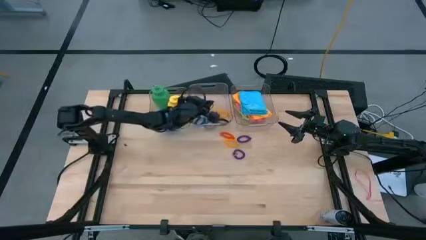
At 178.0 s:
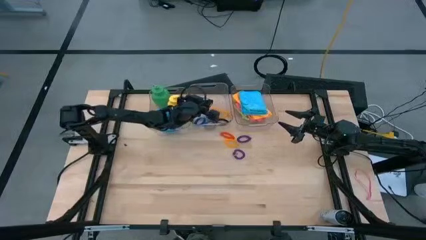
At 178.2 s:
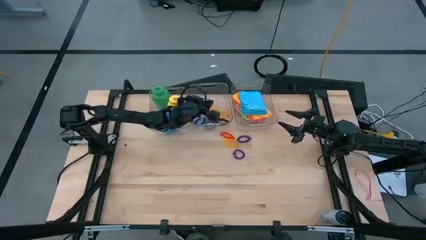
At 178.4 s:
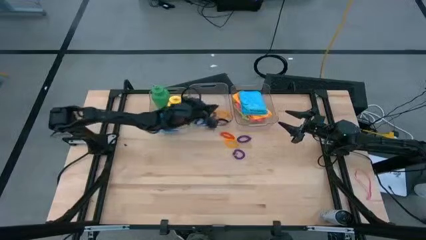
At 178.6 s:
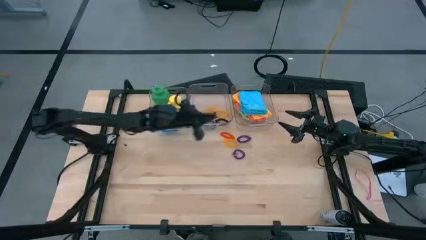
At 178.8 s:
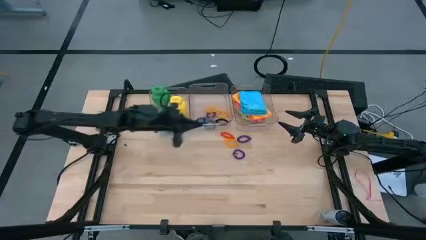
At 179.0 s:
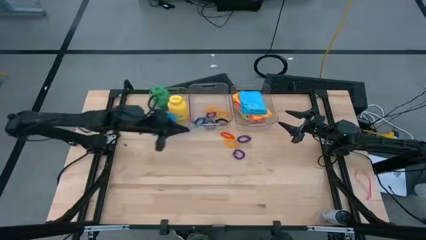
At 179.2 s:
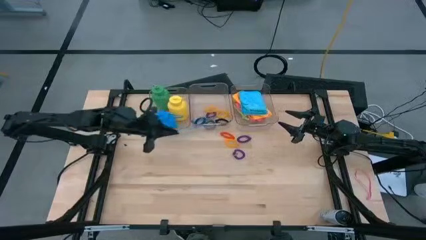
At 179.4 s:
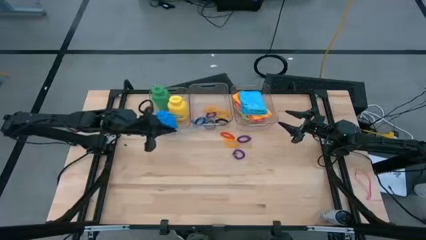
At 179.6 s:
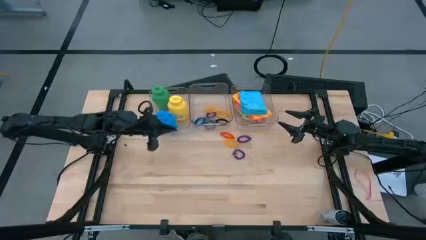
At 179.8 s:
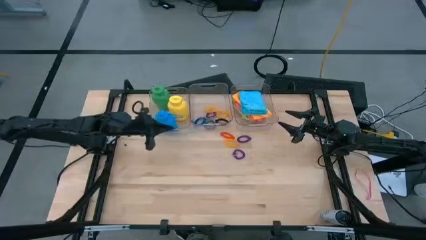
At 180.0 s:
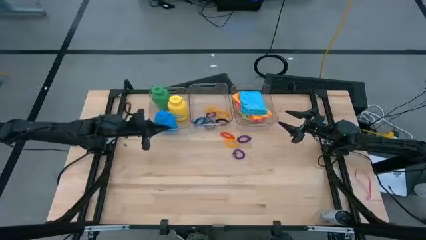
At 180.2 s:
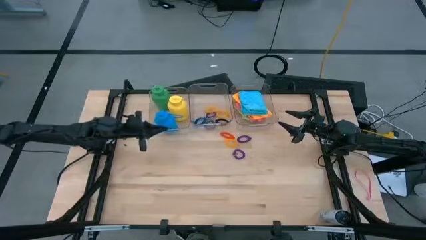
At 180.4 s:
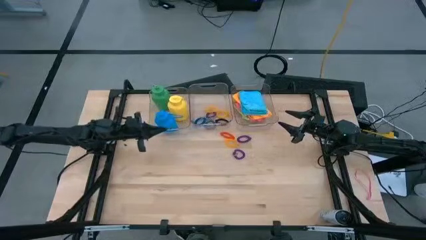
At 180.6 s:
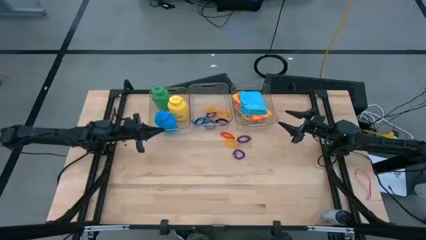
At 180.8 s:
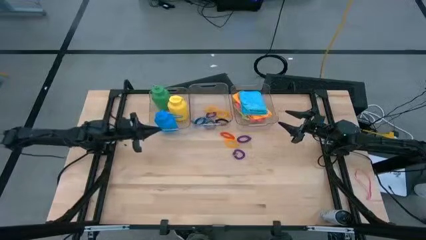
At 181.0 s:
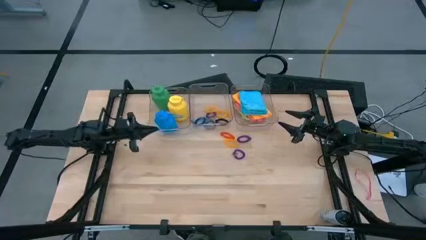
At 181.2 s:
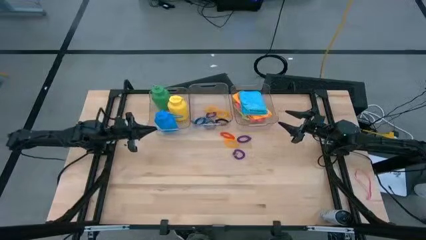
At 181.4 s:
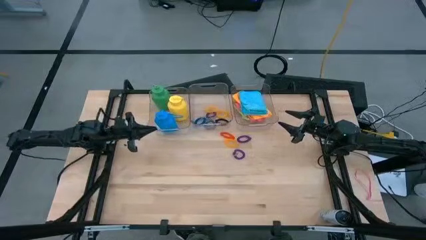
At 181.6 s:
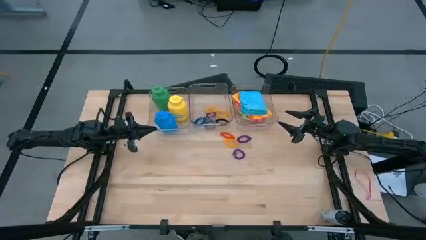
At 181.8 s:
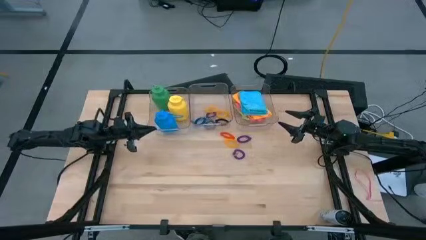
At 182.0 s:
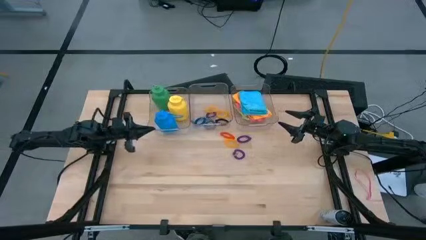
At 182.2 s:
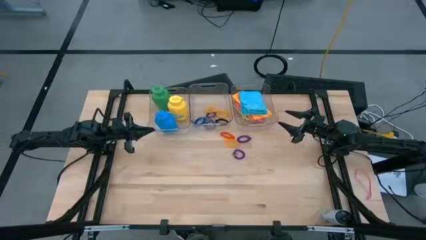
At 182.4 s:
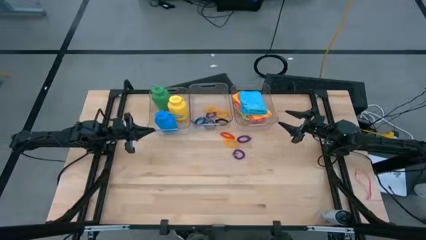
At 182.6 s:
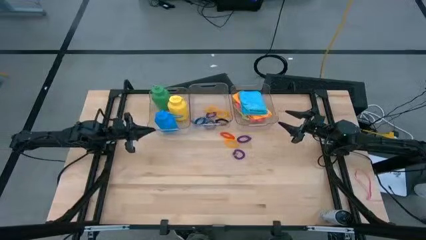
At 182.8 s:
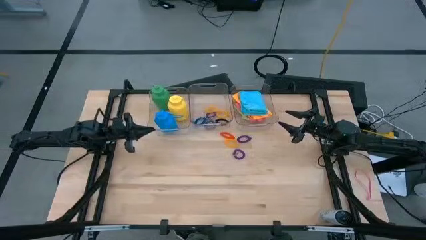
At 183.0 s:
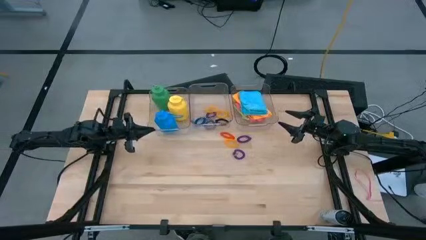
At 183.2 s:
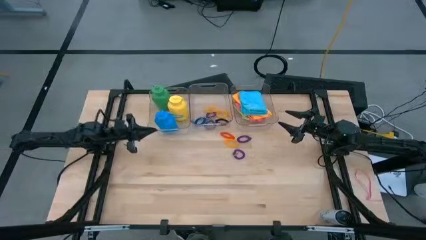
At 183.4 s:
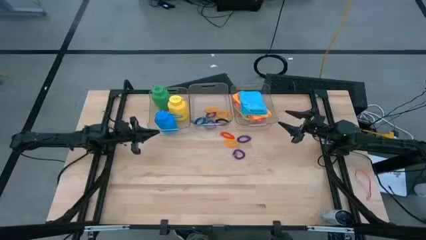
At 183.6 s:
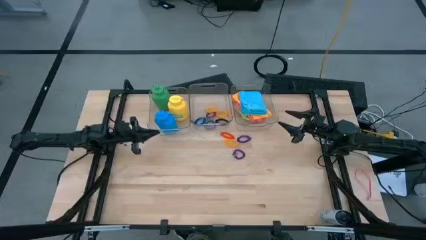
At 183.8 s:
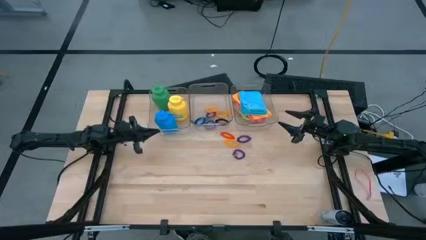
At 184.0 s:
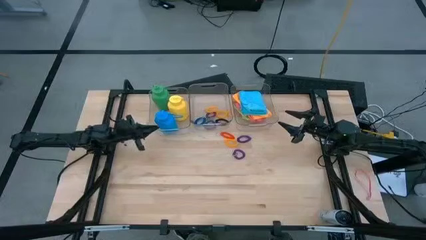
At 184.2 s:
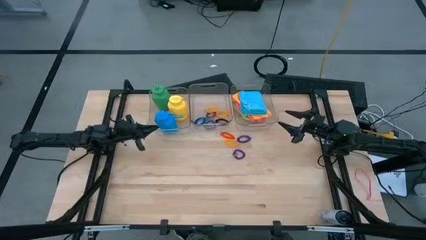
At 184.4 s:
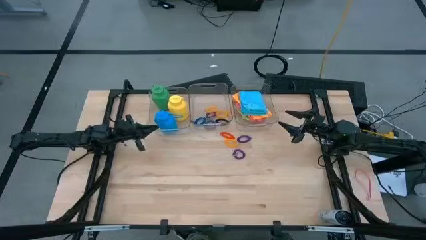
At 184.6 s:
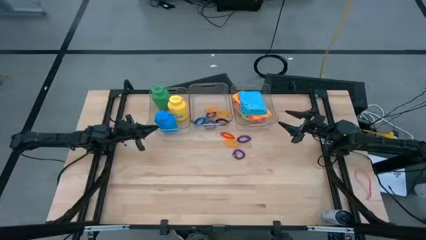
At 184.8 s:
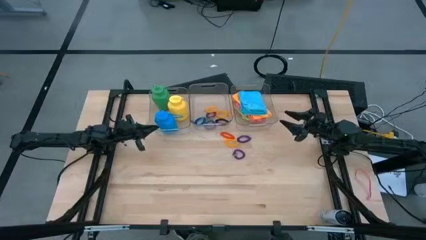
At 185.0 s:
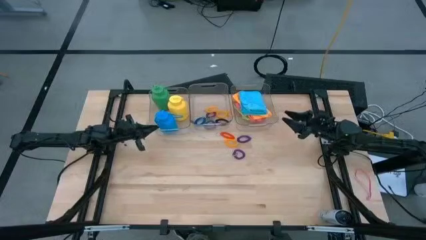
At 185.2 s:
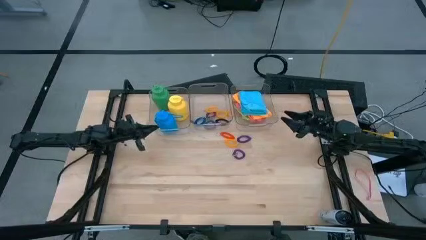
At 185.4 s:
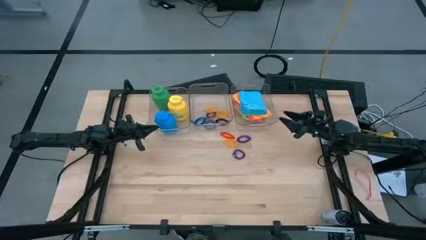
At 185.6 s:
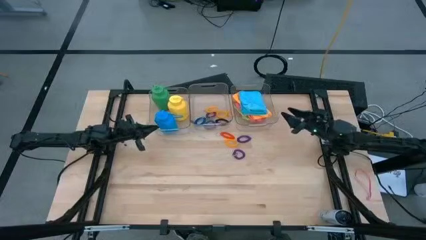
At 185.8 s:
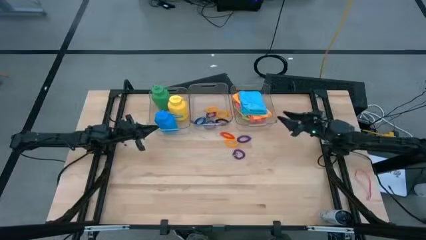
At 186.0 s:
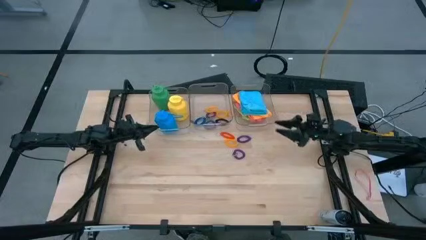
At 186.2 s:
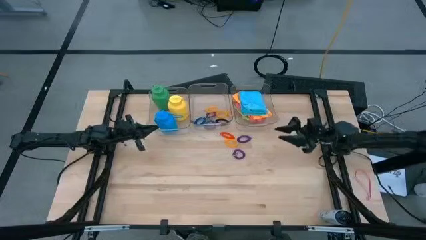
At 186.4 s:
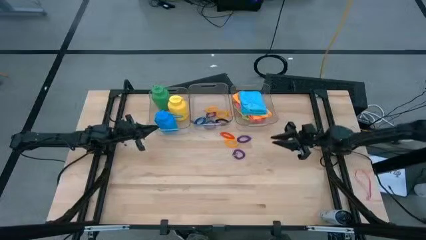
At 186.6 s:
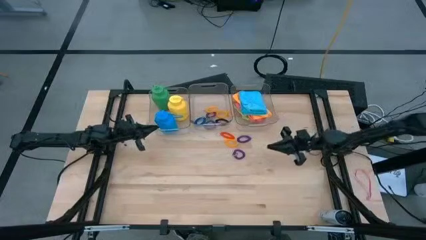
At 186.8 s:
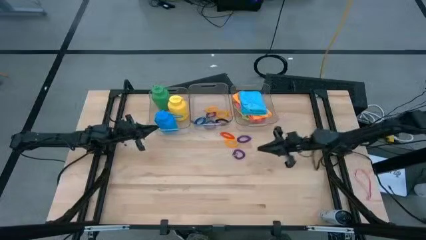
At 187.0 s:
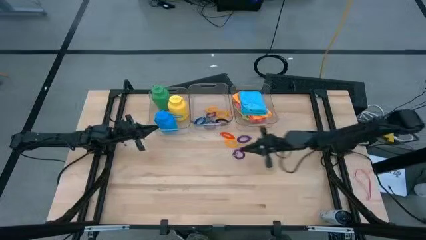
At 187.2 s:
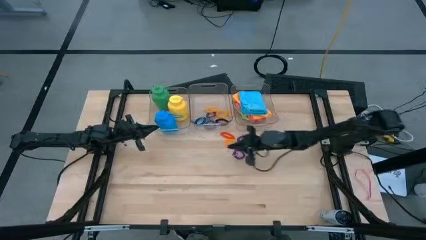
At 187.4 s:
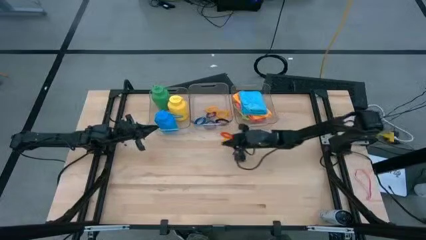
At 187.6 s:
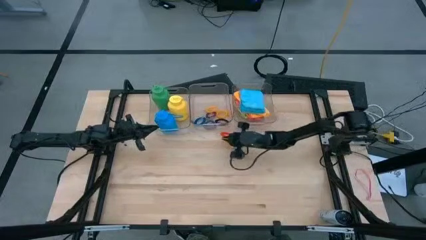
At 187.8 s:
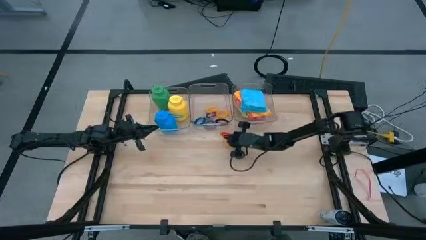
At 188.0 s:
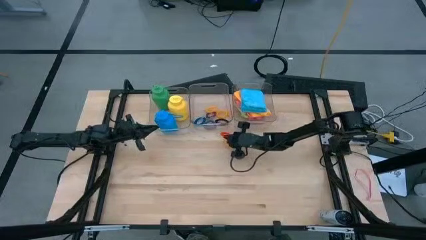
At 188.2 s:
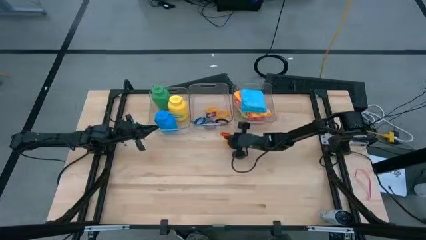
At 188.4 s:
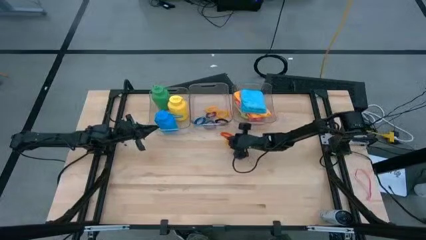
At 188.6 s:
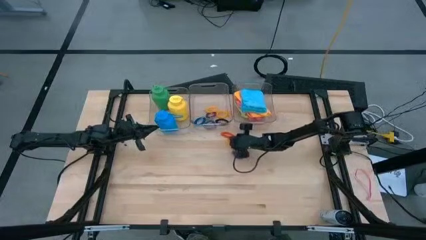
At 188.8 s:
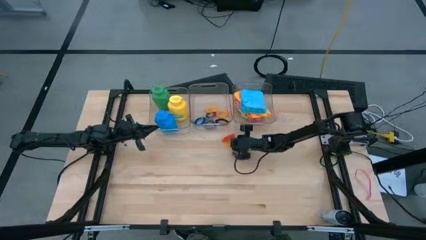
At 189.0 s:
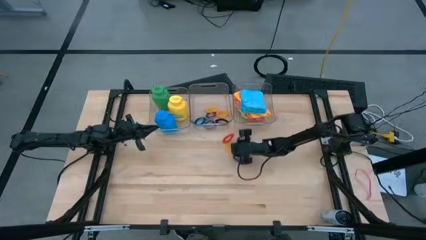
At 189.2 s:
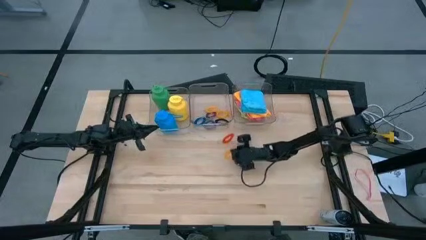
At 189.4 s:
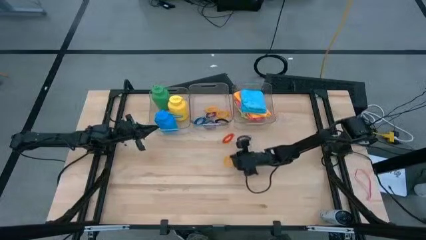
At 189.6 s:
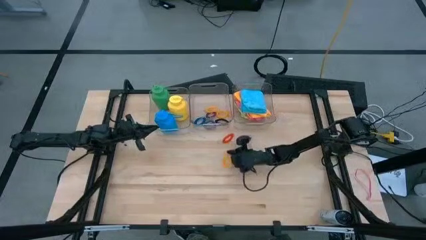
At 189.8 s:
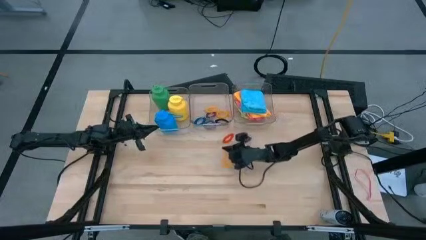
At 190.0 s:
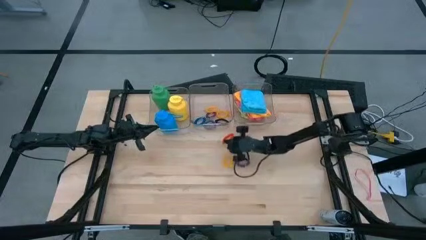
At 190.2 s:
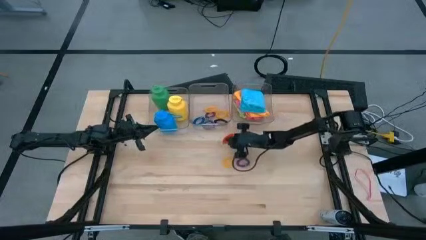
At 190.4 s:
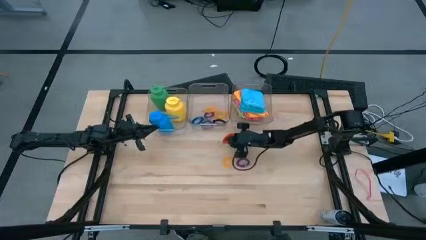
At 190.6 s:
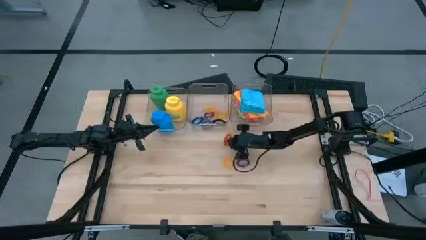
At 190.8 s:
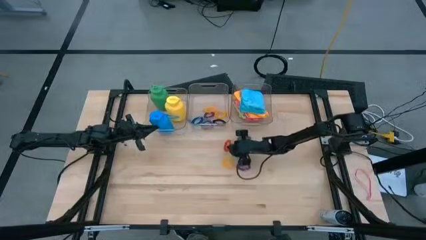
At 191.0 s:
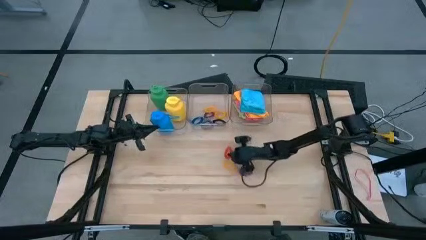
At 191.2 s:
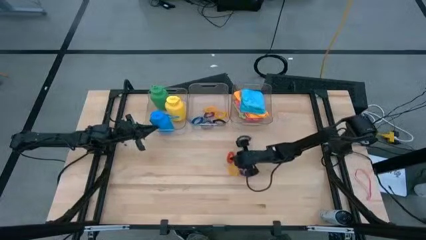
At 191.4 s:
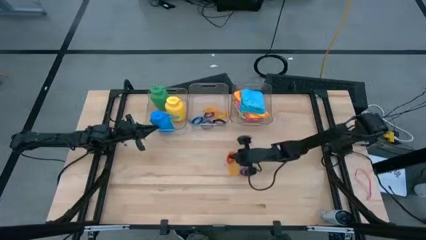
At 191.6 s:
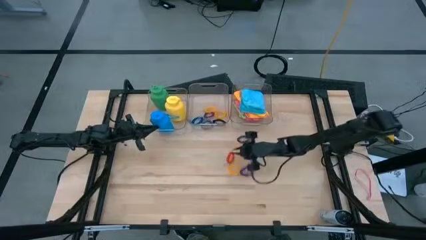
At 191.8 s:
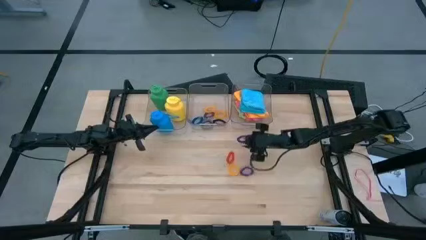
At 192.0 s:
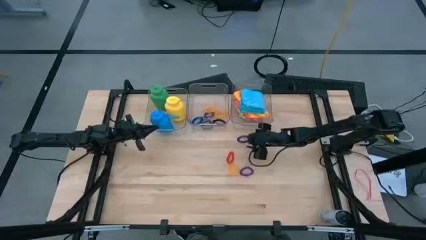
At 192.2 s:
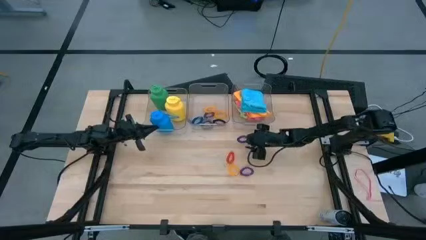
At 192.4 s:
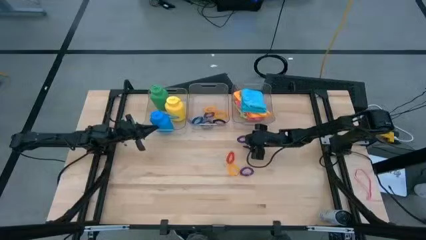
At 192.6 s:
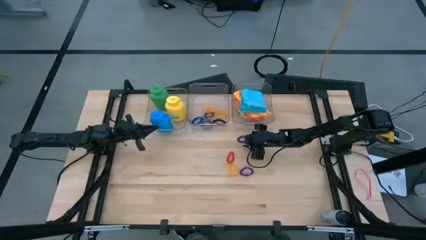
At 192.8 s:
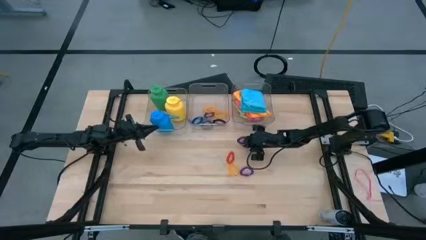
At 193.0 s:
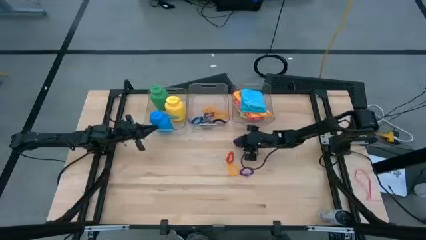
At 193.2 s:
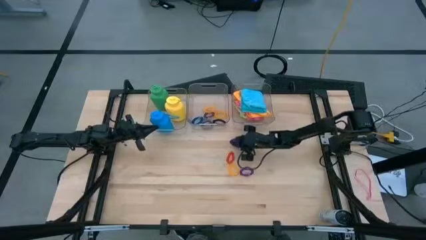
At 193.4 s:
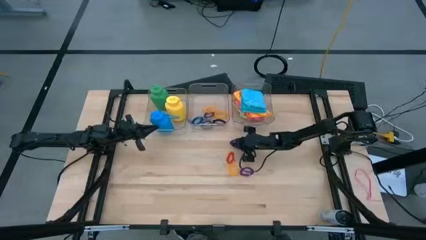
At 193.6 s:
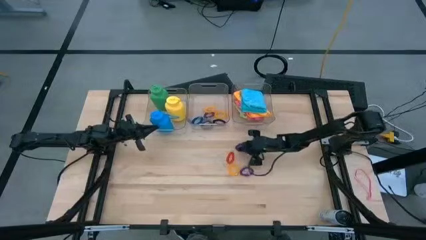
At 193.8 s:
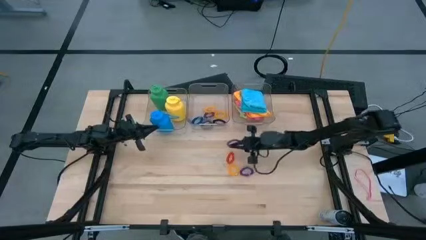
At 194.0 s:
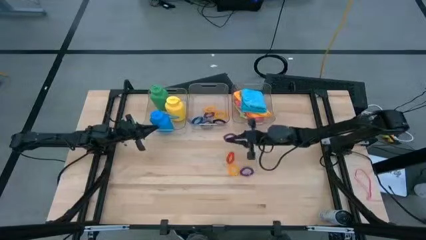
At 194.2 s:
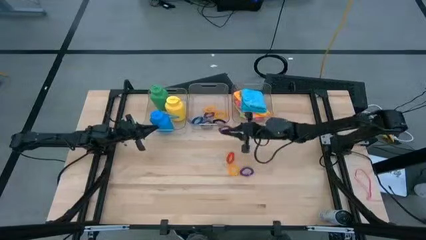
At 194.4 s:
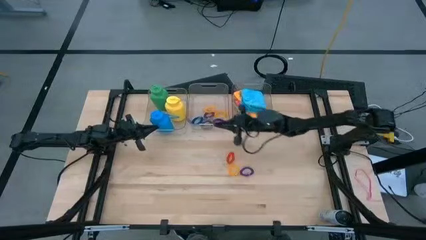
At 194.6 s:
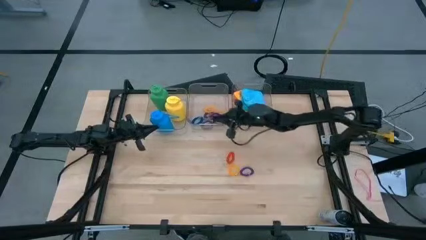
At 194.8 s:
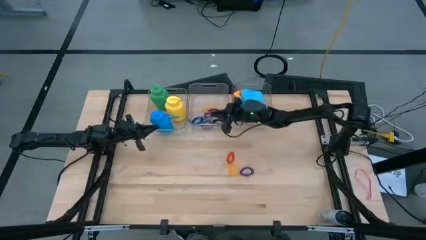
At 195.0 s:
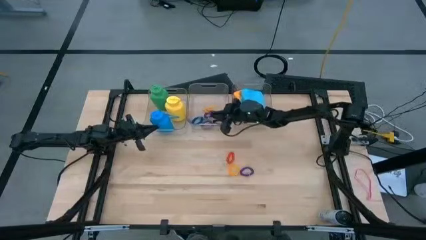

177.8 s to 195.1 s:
Task: Pick & Place Sports Items
Put the purple wrist coil into the middle transparent container
